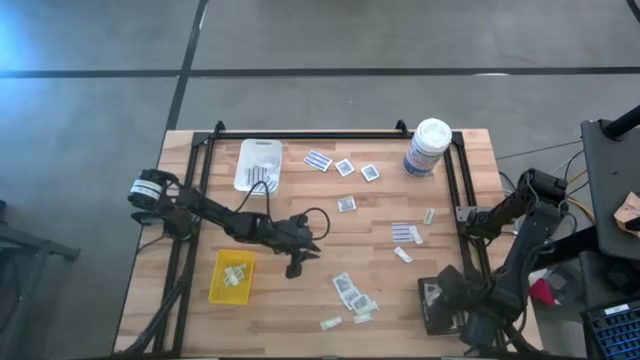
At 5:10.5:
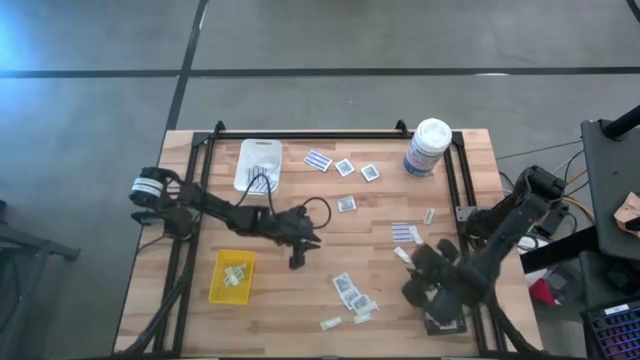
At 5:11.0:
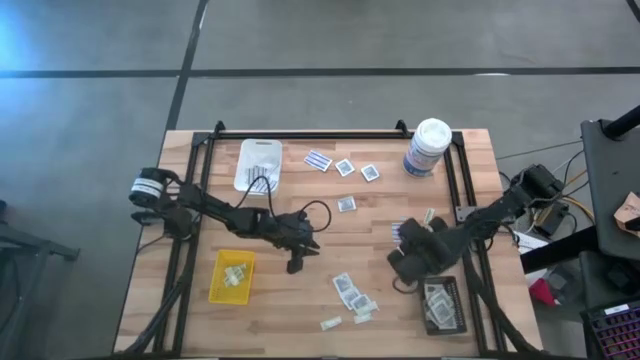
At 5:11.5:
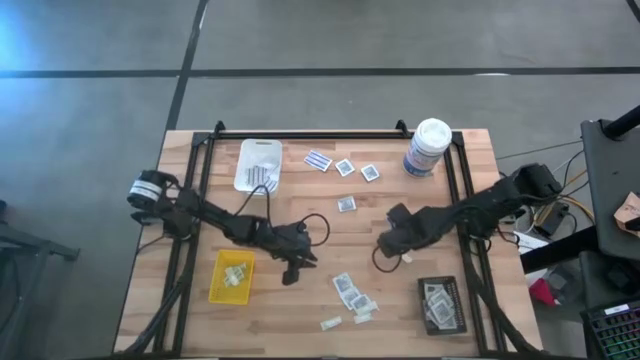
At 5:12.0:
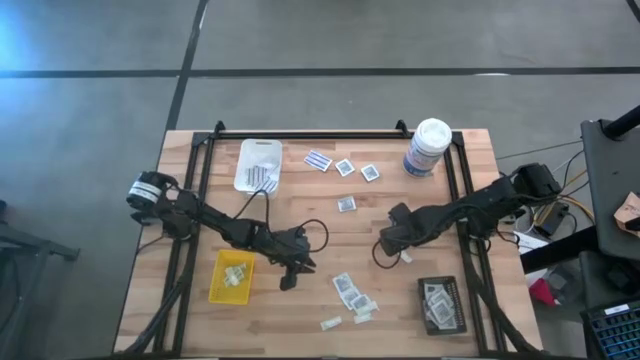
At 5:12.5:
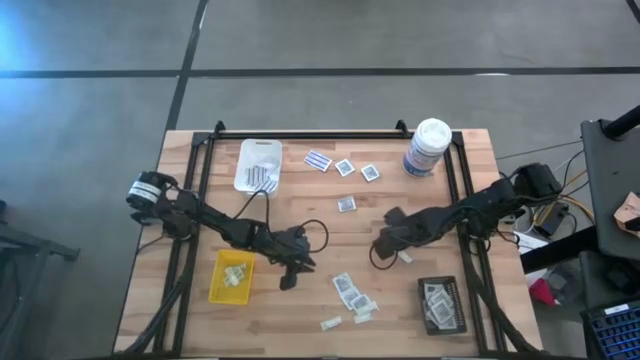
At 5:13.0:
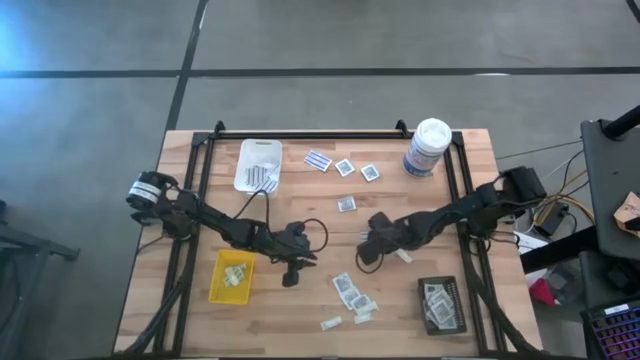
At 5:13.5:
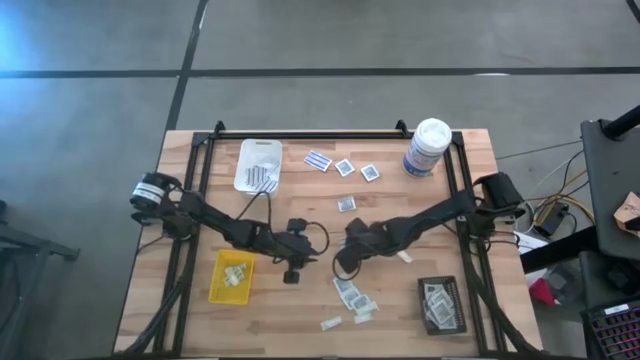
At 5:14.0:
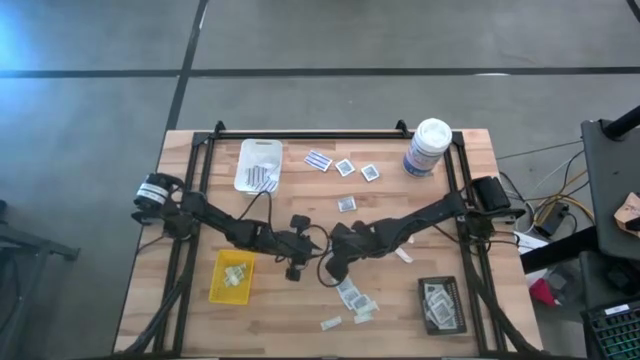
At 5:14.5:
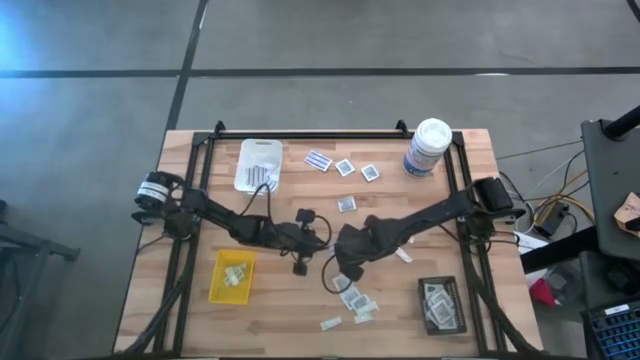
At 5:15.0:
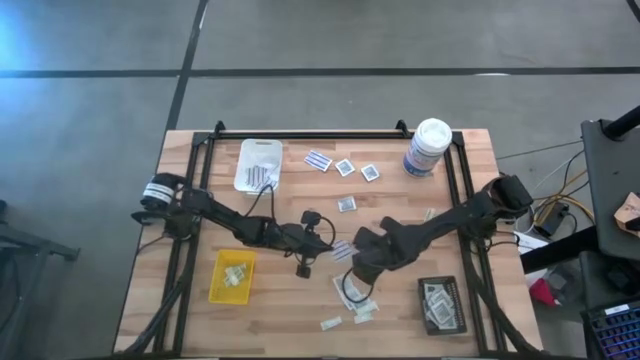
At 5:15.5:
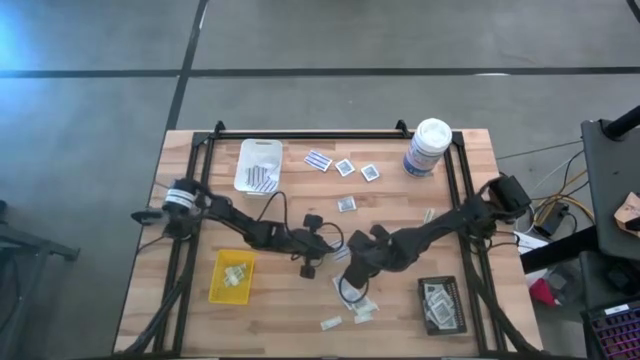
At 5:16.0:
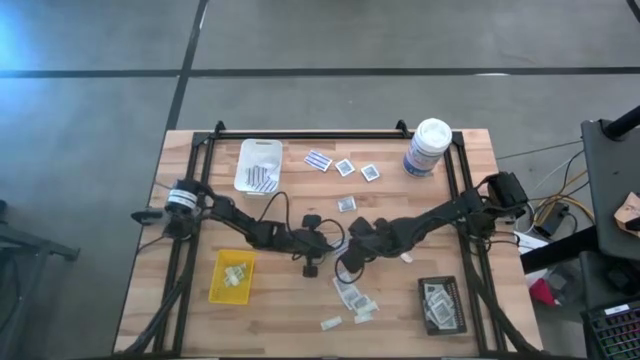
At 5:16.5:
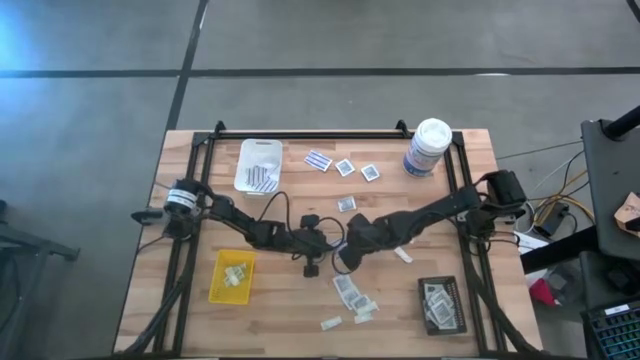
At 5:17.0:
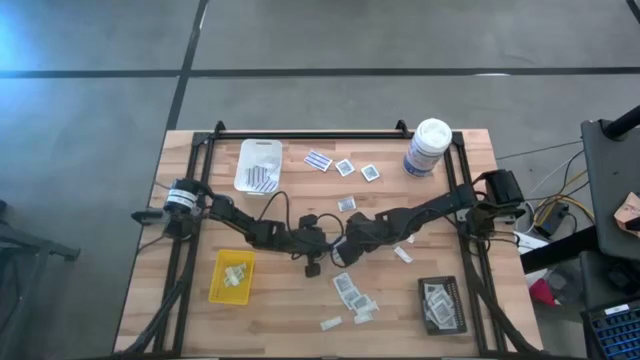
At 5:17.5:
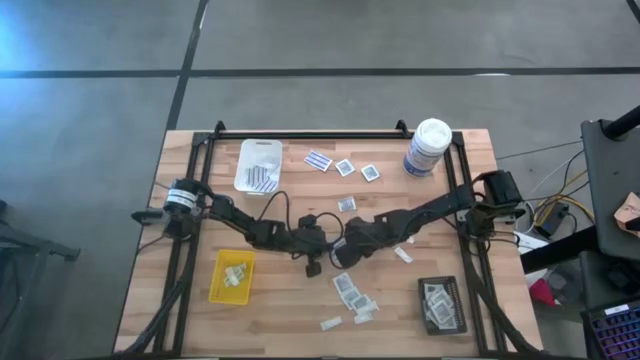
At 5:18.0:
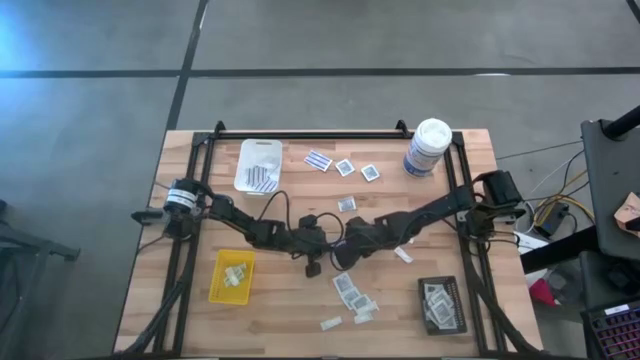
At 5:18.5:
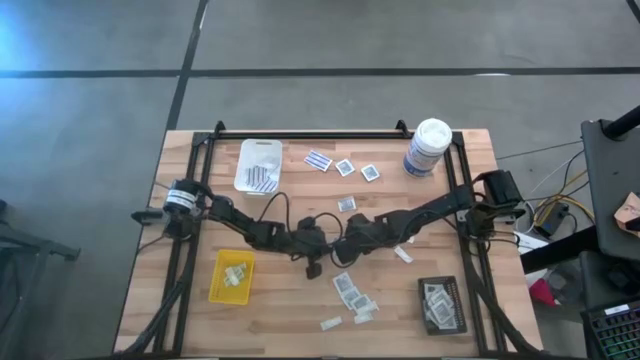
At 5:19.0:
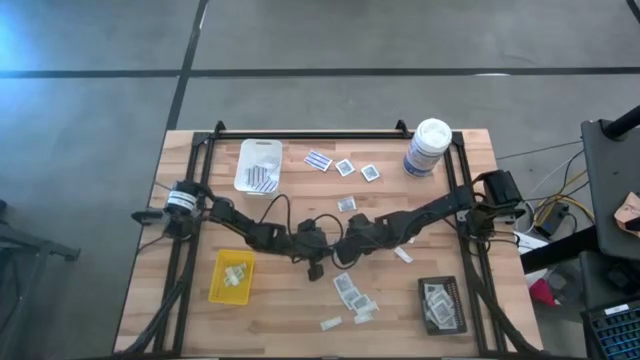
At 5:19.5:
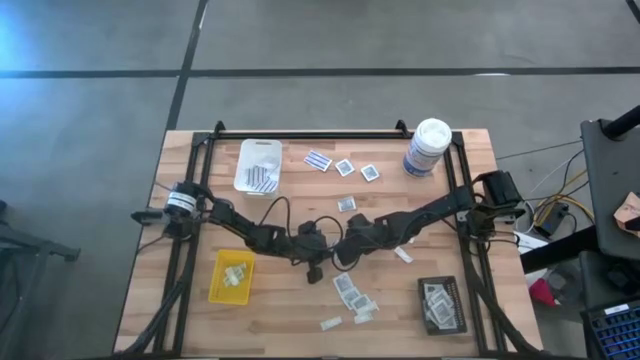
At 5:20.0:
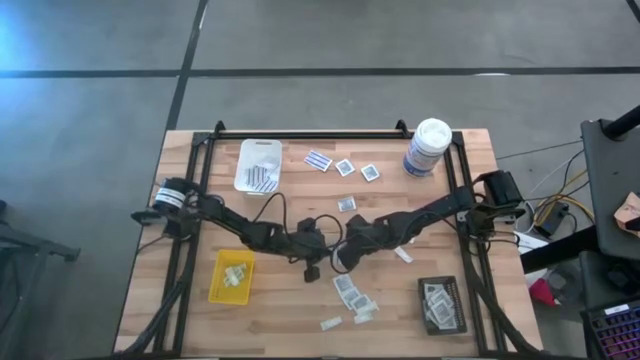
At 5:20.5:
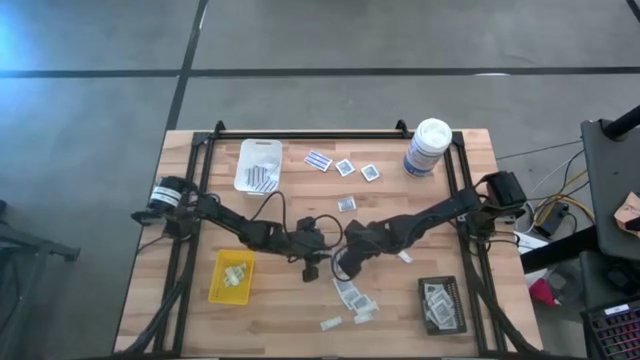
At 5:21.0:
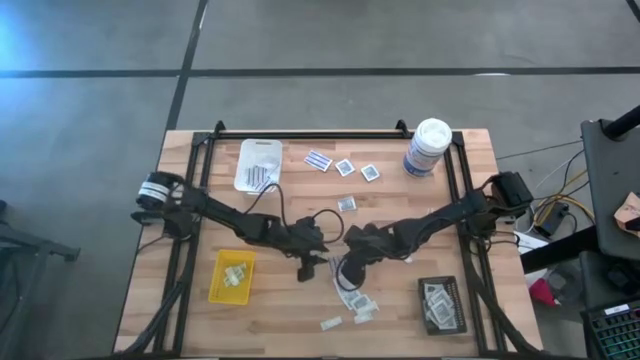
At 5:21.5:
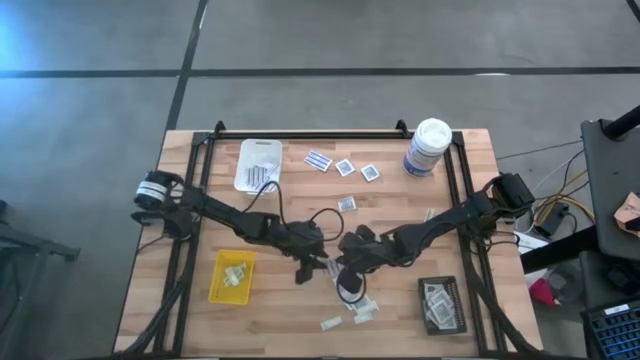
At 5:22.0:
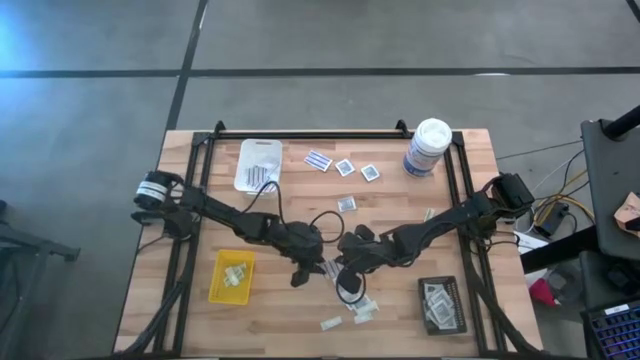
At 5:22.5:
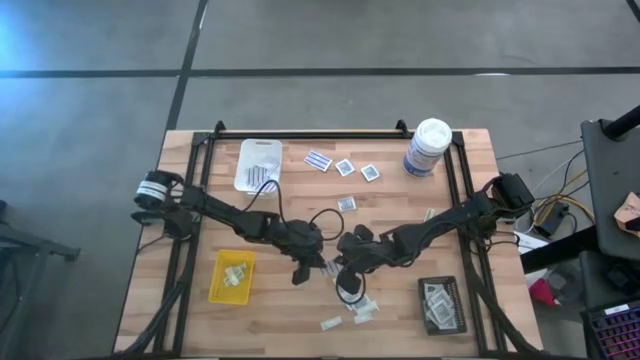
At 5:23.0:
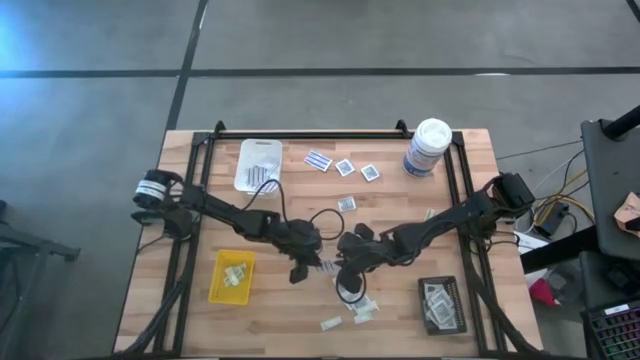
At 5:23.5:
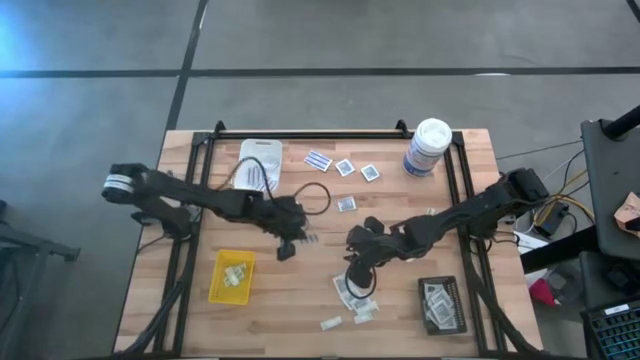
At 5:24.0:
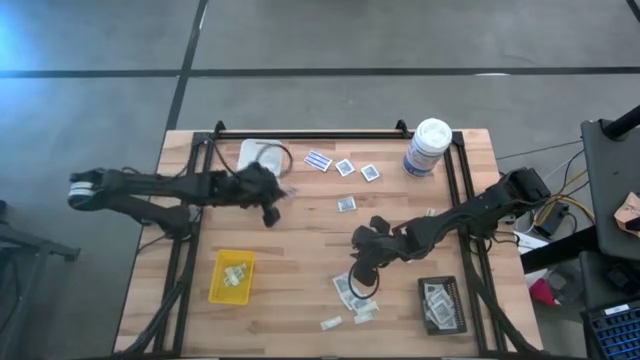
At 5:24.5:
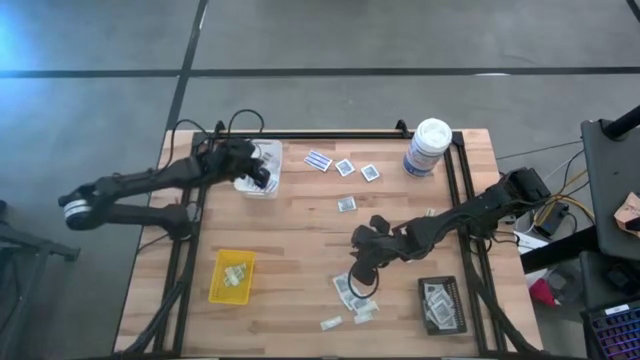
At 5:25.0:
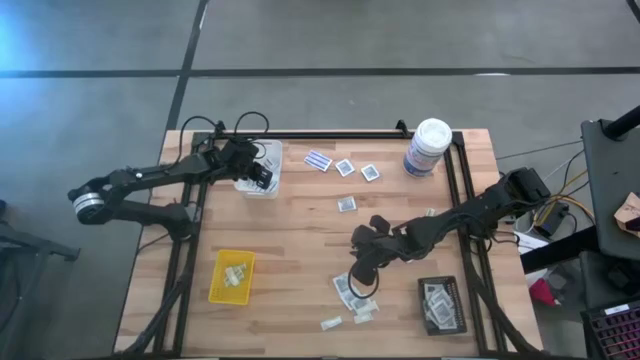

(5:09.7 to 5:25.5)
Task: Pick & Place First Aid Supplies
Put the blue bandage into the white bin

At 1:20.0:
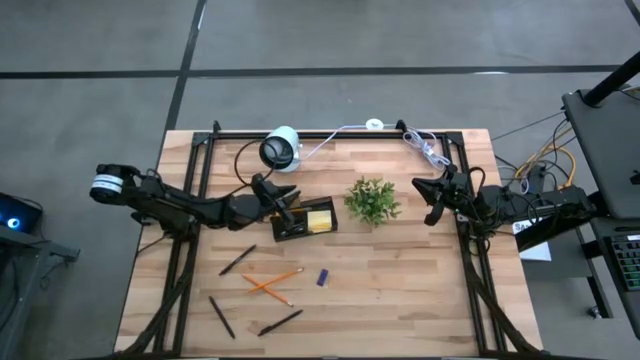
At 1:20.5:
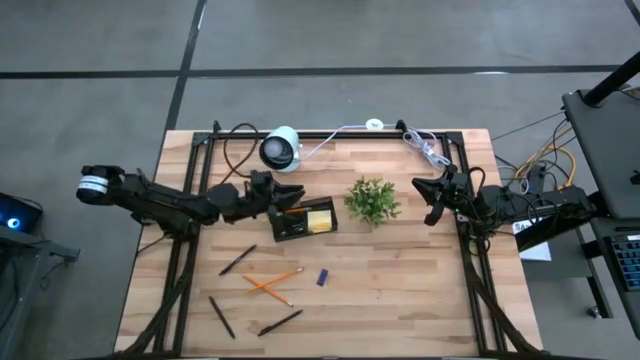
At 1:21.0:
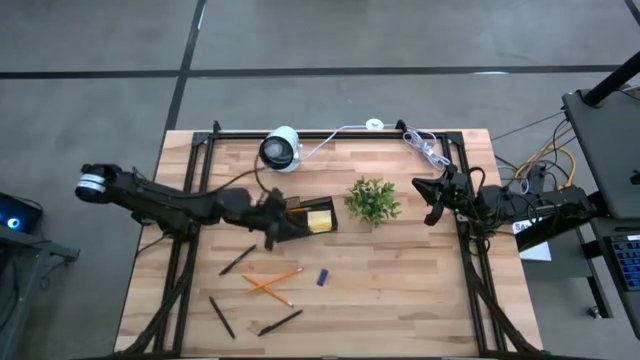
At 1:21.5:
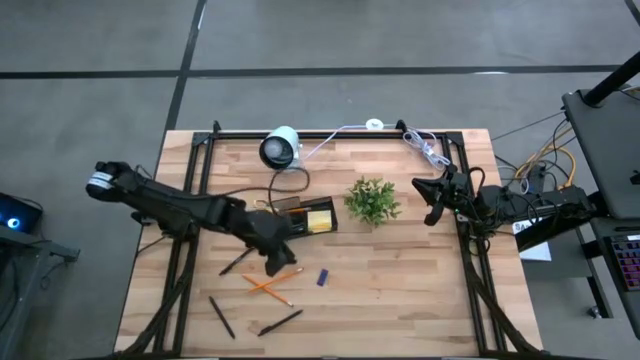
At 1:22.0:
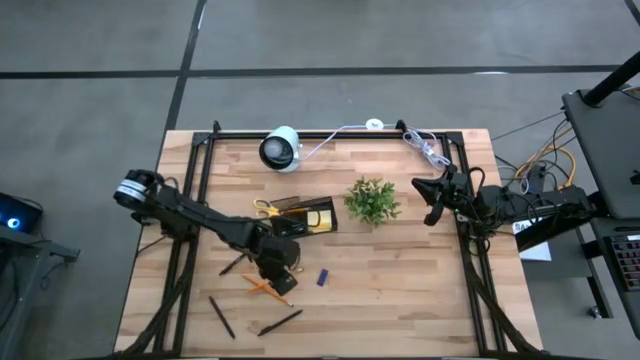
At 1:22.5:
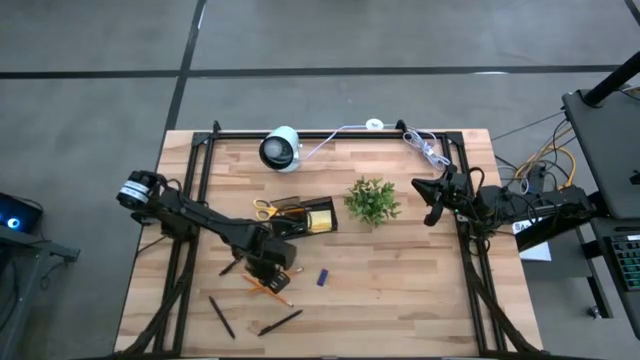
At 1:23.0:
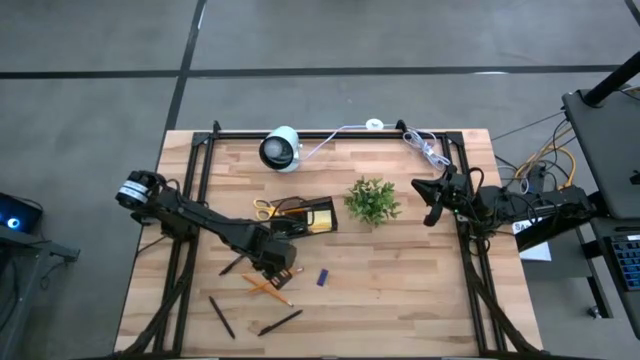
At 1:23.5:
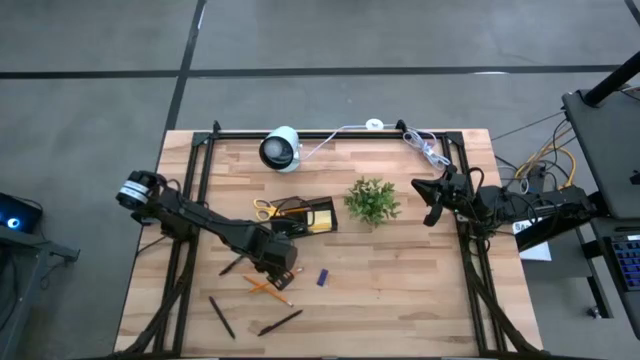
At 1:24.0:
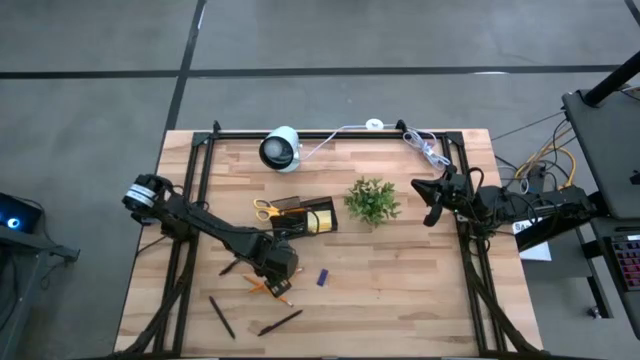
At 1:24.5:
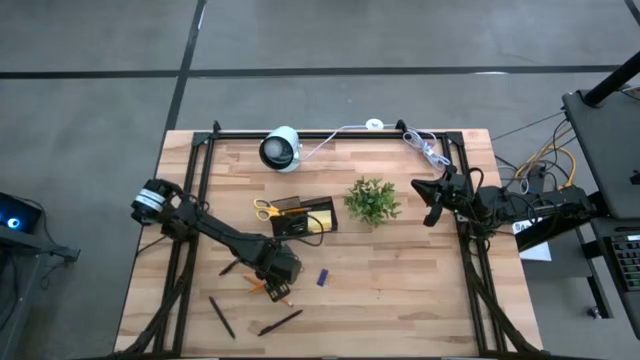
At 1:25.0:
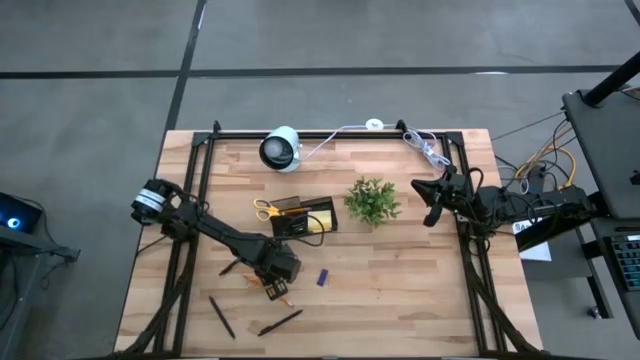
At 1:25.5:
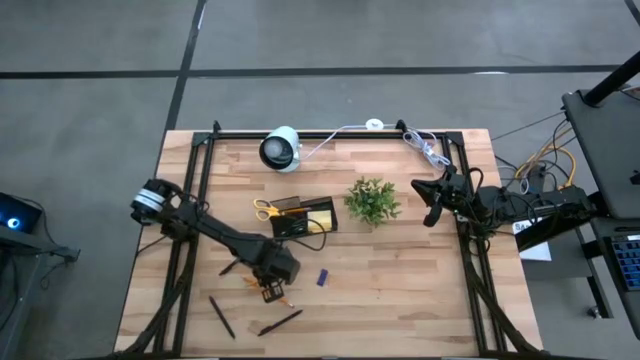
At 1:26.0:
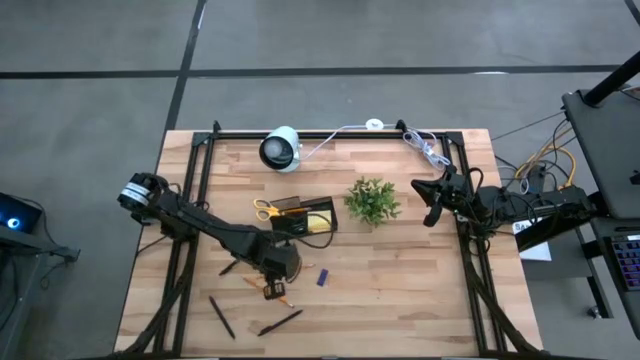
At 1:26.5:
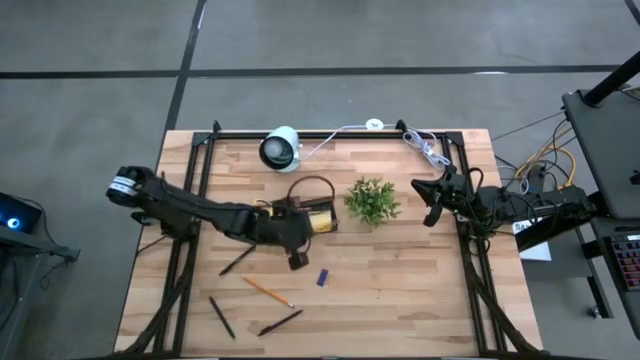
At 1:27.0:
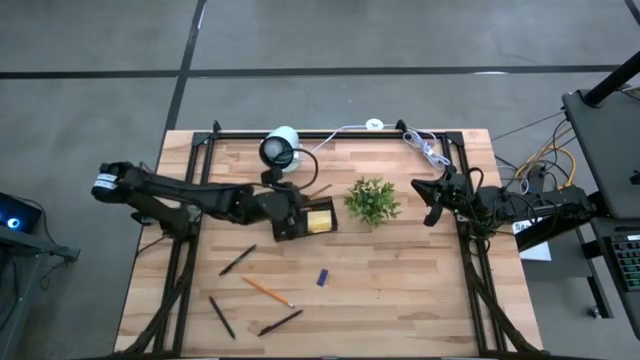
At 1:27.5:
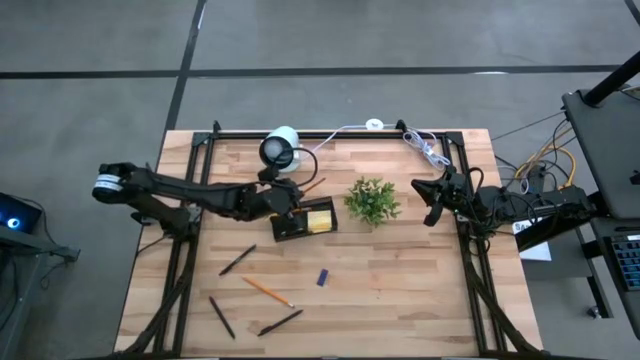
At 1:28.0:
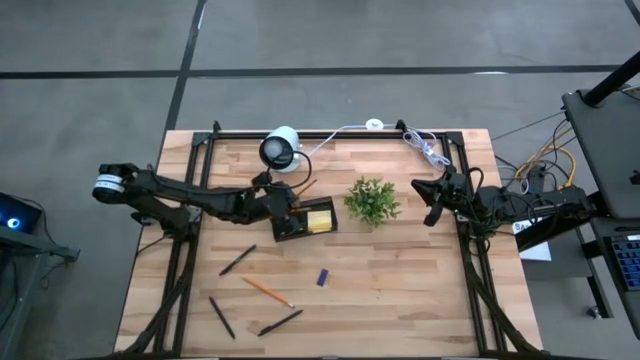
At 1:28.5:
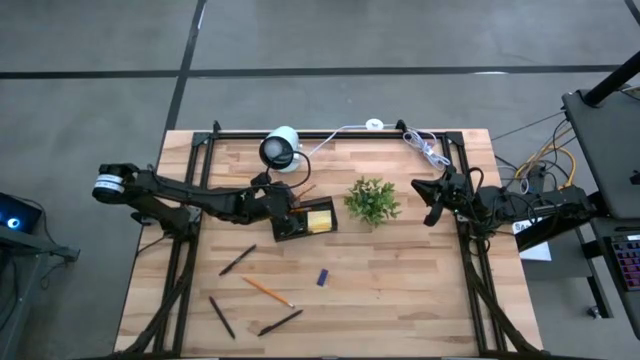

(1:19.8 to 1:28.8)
Task: Pick and place office supplies into organizer
Put the top yellow pencil in the black desk organizer
